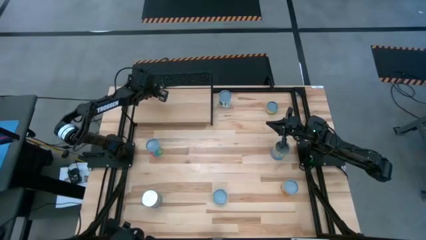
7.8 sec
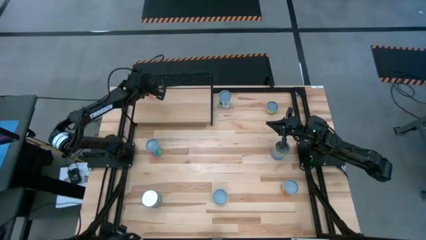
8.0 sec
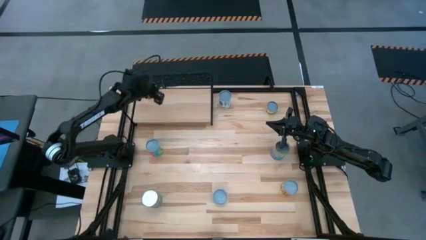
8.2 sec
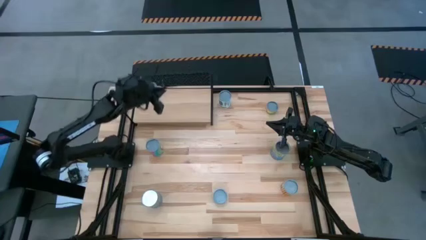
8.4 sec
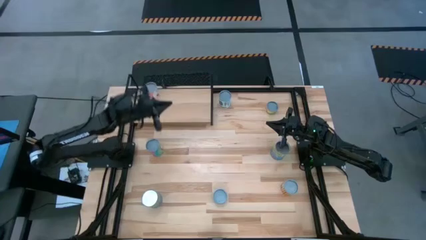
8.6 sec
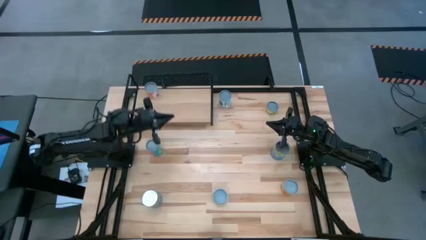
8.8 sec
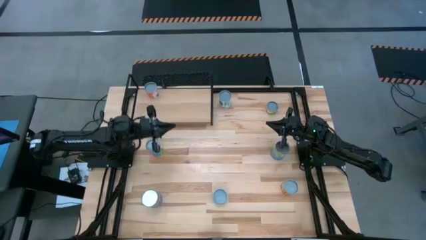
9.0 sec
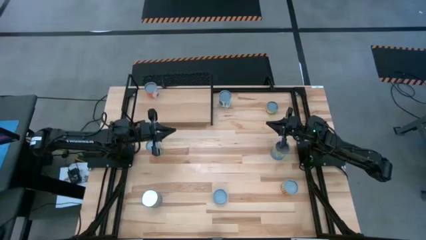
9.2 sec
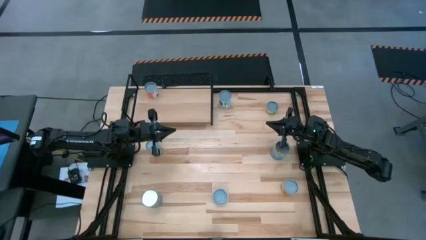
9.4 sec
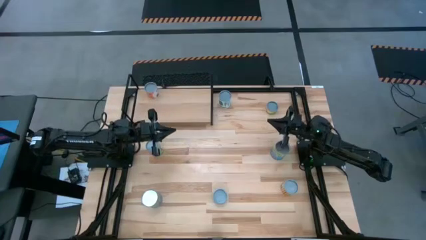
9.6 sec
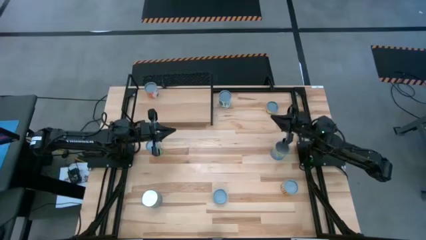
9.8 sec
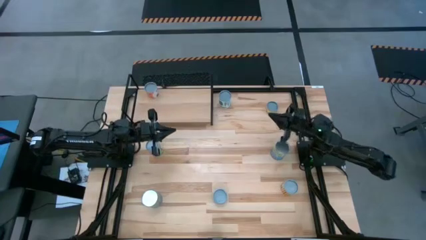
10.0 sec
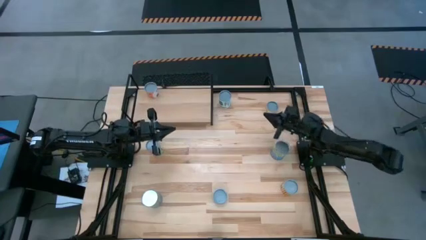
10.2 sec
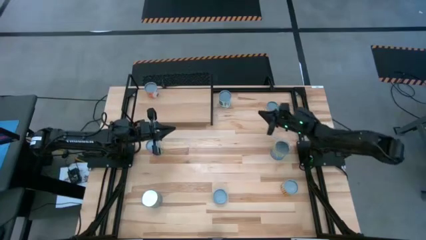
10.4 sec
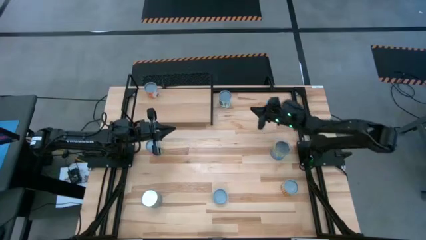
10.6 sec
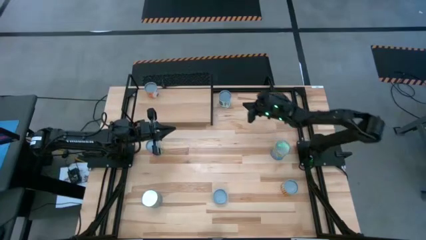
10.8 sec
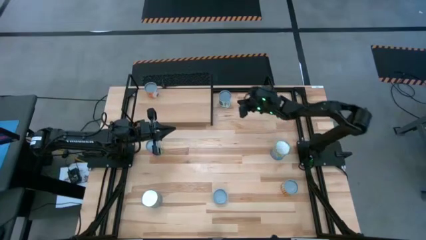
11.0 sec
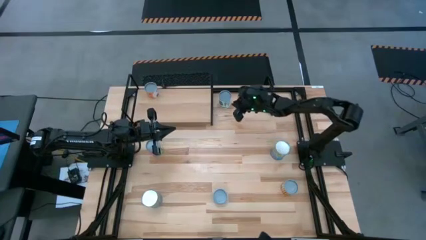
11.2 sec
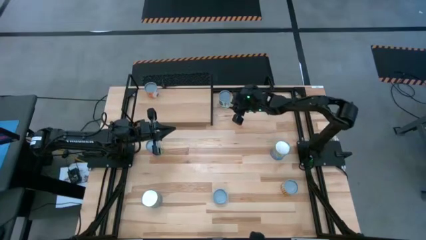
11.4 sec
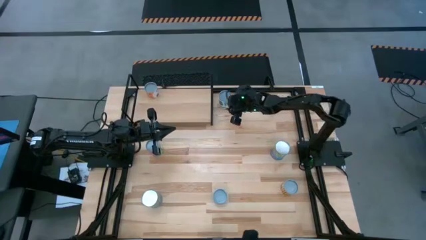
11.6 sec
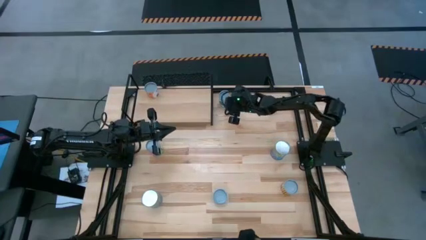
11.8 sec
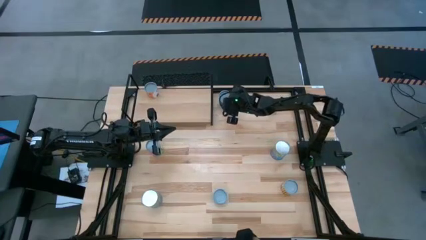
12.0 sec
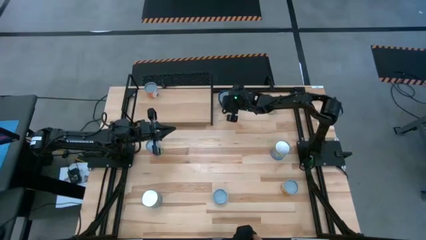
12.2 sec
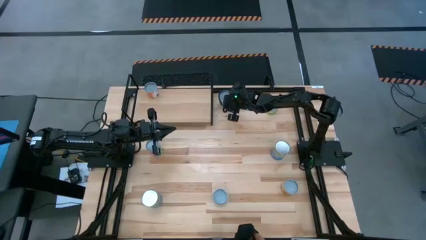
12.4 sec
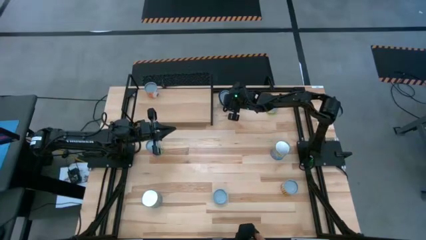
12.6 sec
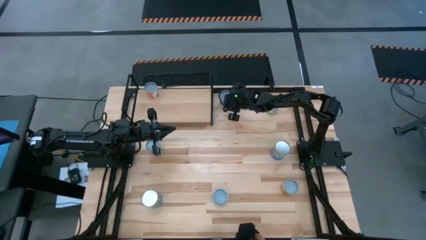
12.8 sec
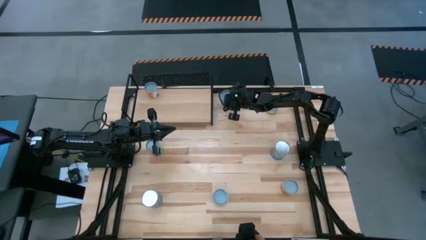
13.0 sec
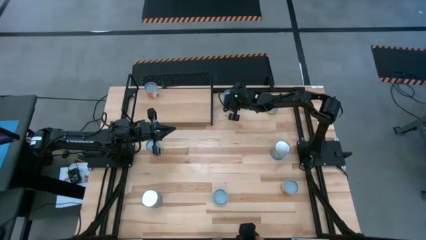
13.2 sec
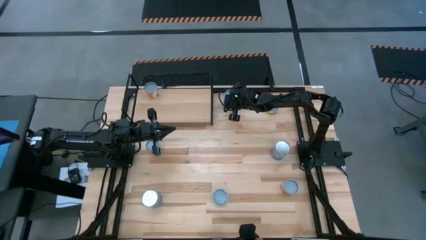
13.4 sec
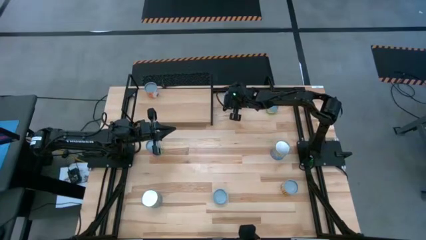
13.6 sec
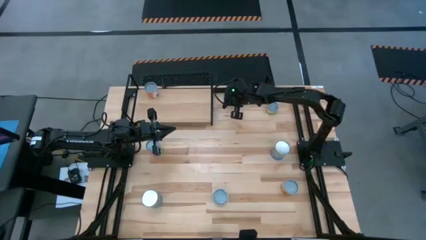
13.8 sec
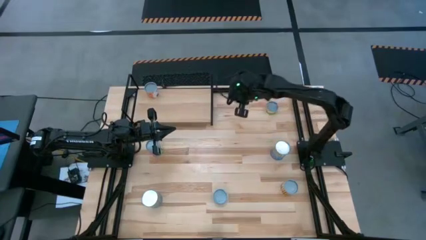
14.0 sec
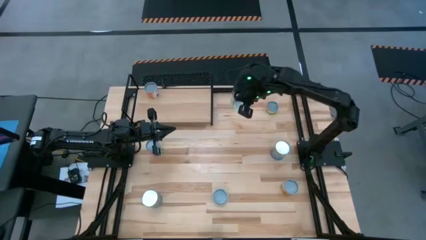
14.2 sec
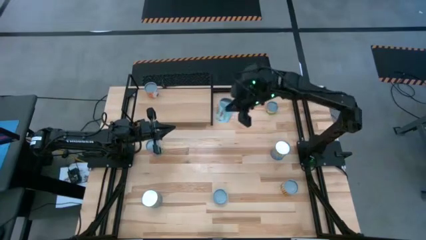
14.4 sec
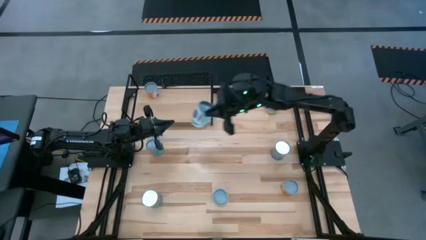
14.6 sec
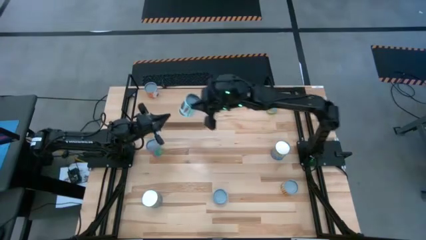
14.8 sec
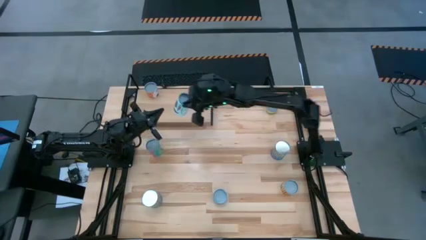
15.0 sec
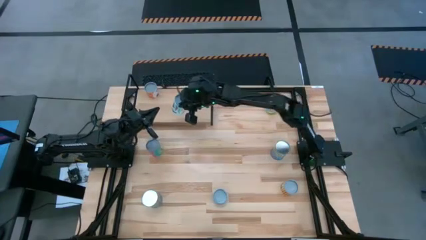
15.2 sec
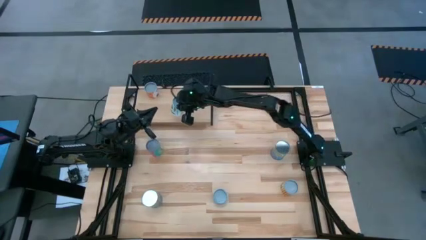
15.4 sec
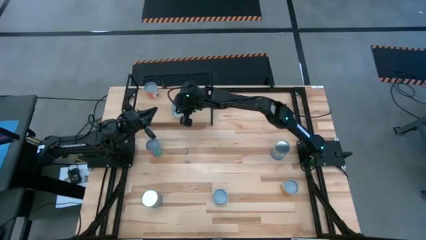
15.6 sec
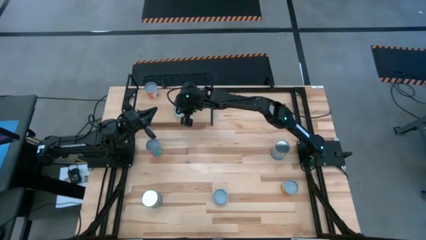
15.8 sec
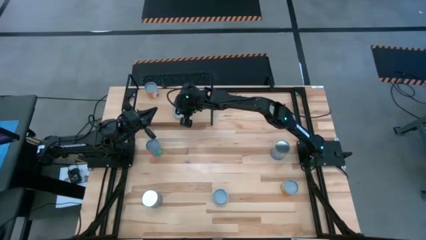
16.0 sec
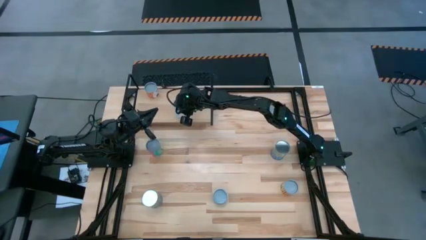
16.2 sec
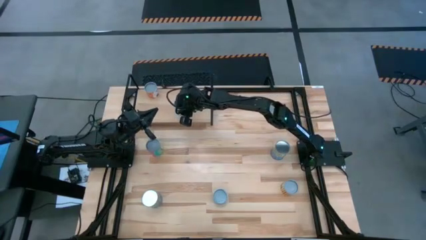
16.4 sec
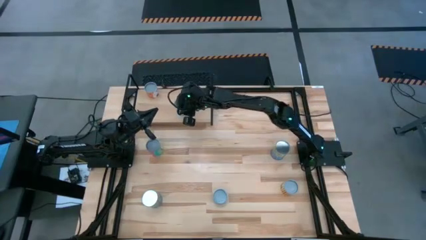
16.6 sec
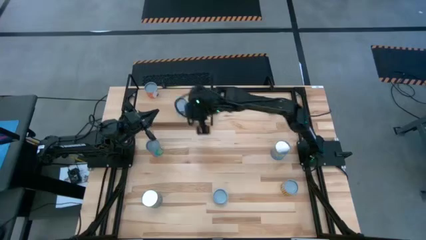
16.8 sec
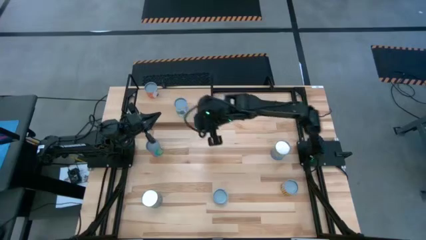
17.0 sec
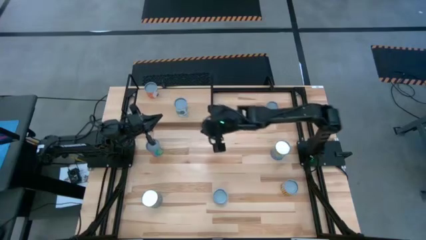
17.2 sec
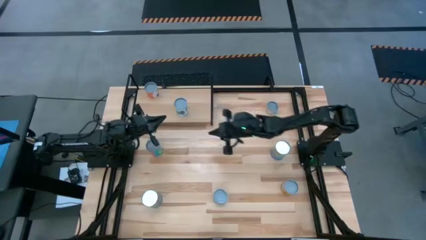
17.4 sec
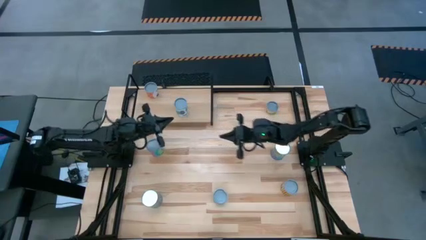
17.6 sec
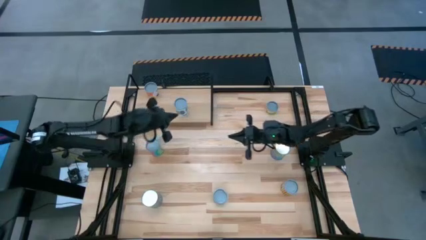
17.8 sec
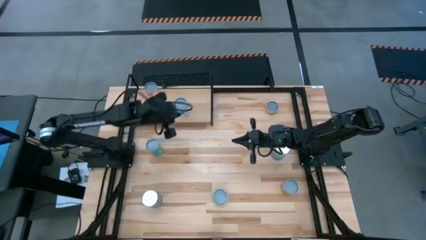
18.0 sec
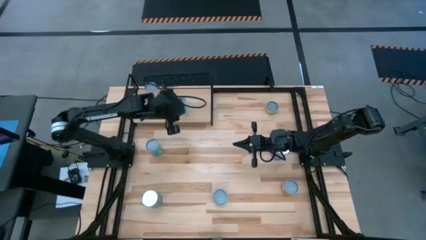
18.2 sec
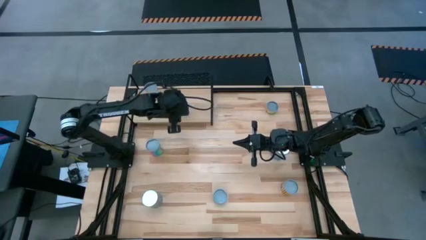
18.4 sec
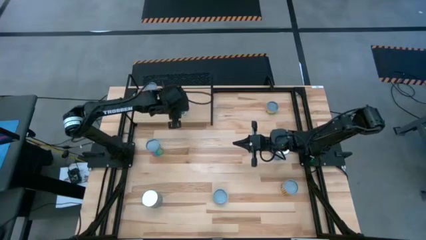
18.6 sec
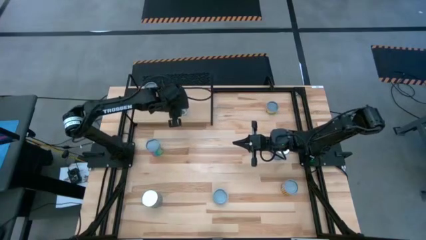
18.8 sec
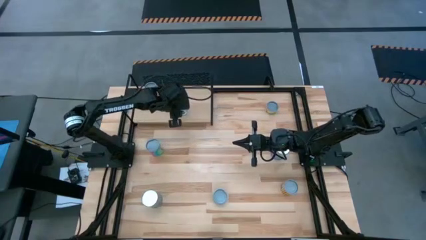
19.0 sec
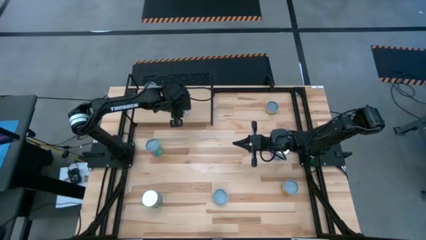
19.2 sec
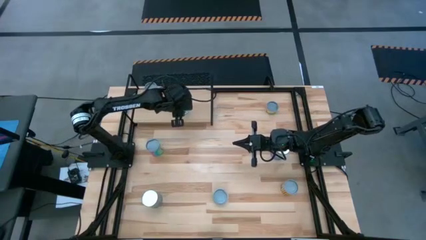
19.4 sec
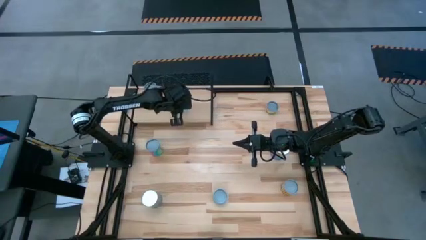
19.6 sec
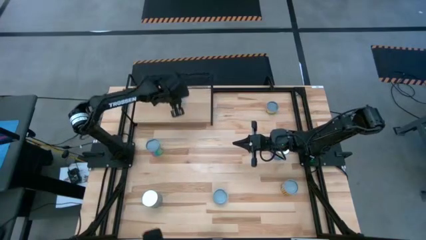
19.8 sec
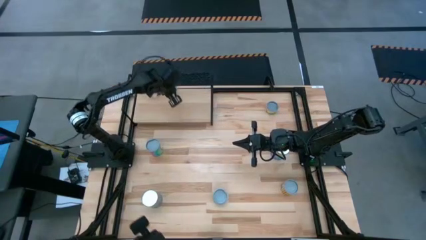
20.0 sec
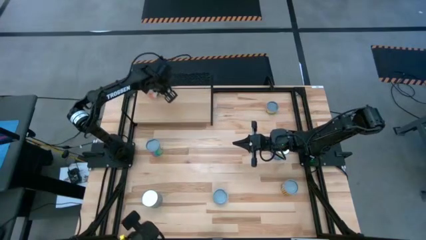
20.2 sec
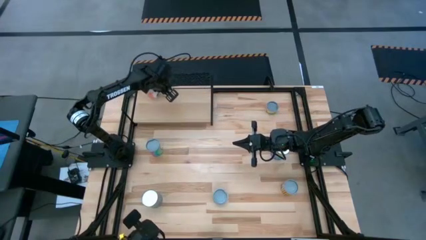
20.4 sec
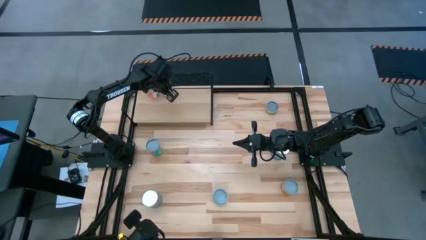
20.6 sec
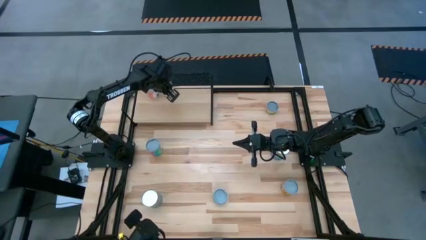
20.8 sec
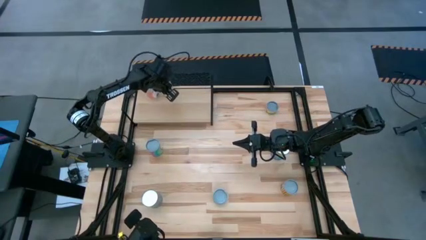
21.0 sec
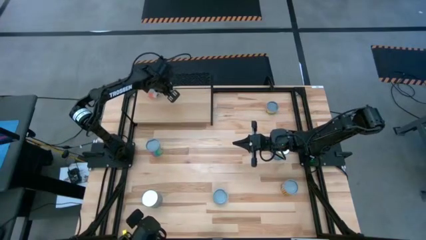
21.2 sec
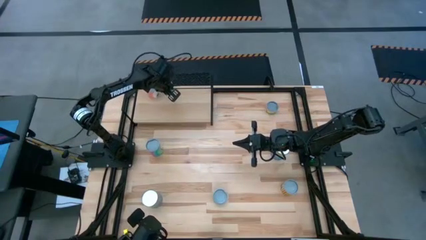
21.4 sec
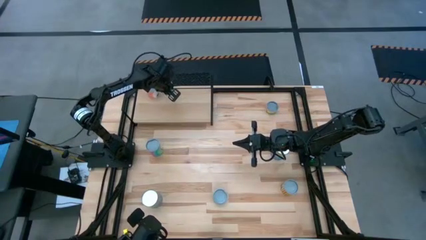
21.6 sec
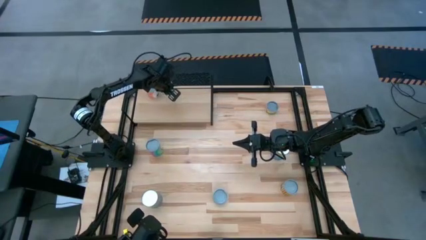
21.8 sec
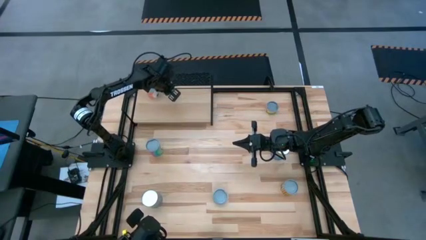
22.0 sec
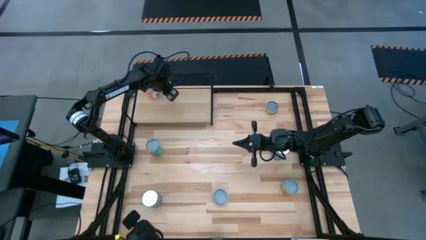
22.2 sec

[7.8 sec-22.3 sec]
Task: Pick and place cans onto a shelf
Put the canned mixed vegetables on the shelf

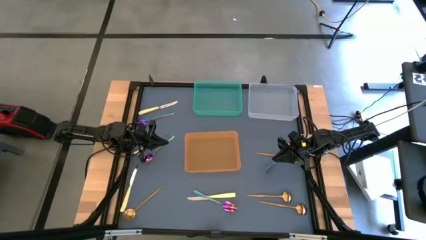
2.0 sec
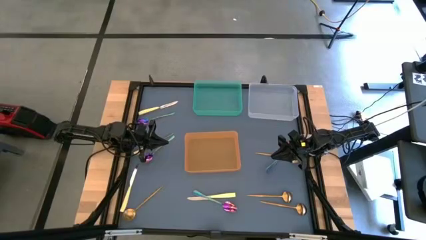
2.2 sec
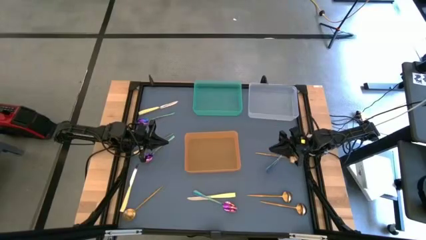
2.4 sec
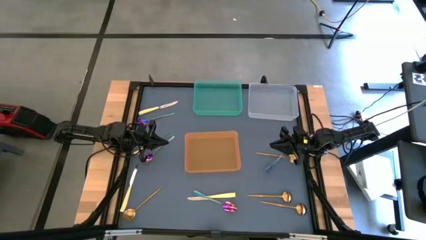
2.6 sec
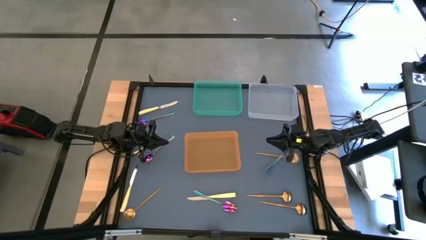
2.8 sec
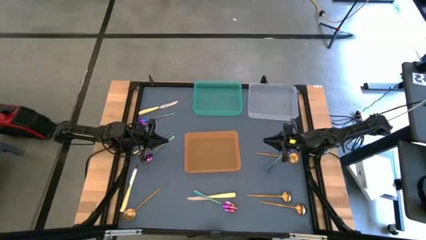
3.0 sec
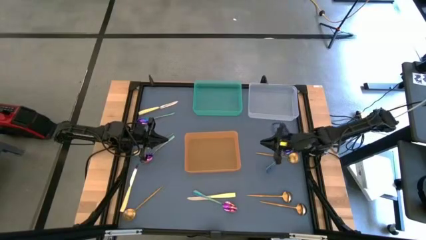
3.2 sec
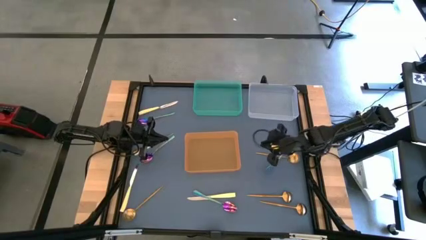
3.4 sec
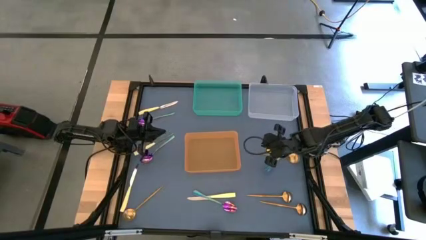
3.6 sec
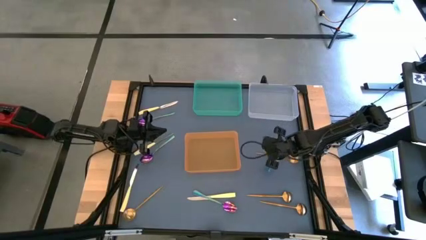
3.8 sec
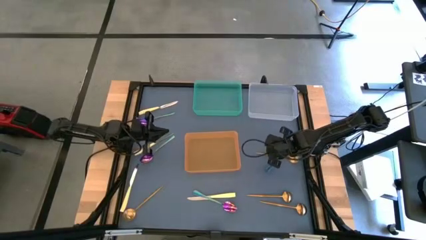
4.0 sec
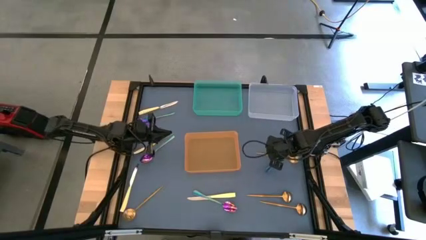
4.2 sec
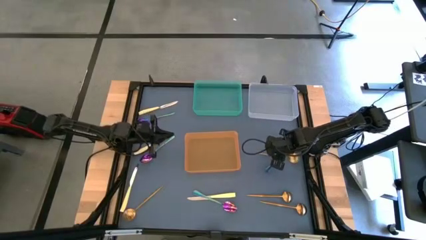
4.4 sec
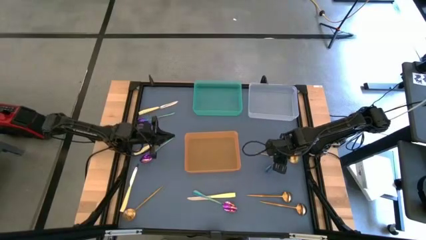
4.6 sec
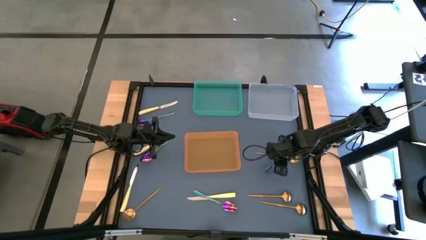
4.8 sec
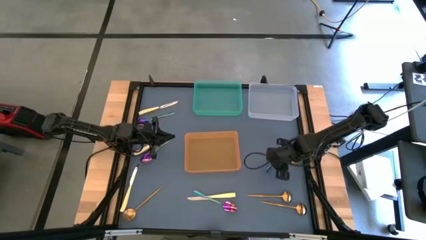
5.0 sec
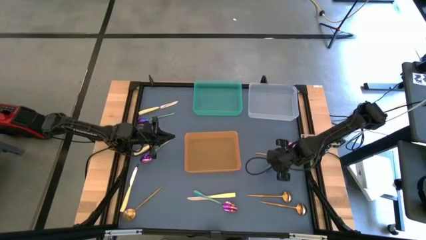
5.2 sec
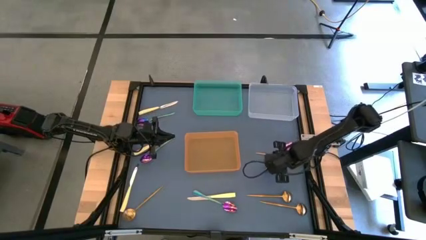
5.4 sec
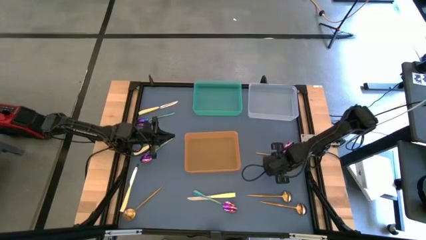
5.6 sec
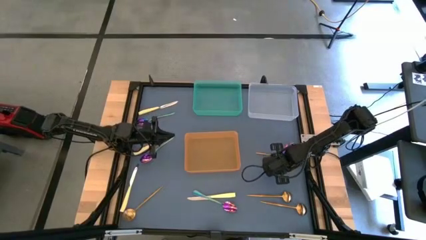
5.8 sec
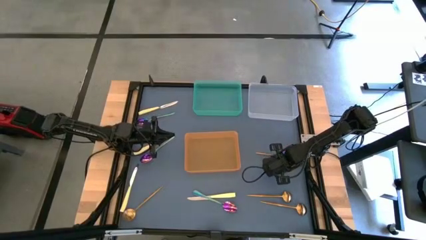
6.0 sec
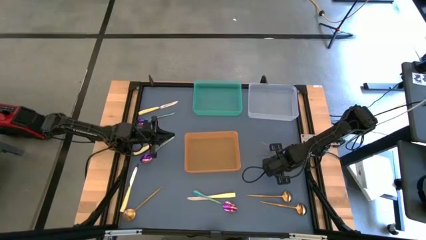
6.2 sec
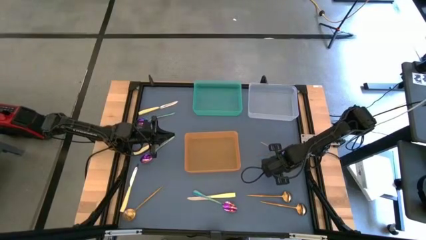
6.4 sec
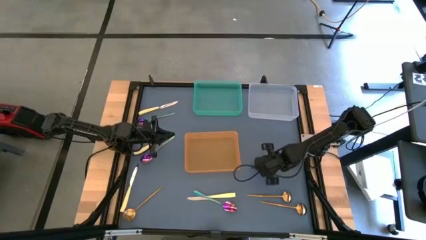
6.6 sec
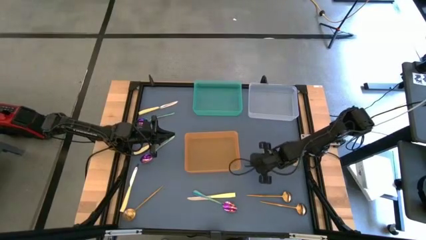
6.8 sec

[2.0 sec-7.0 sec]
Task: Sort silverware by color (type)
Put the blue spoon into the transparent bin
